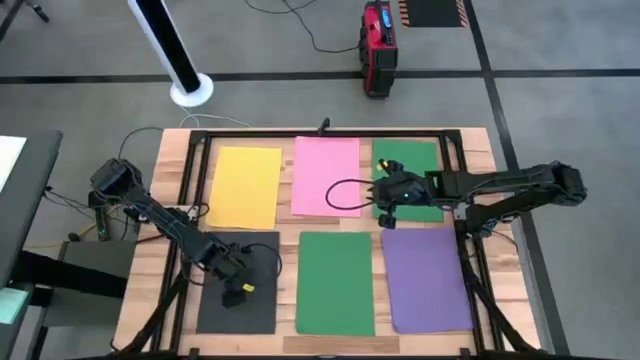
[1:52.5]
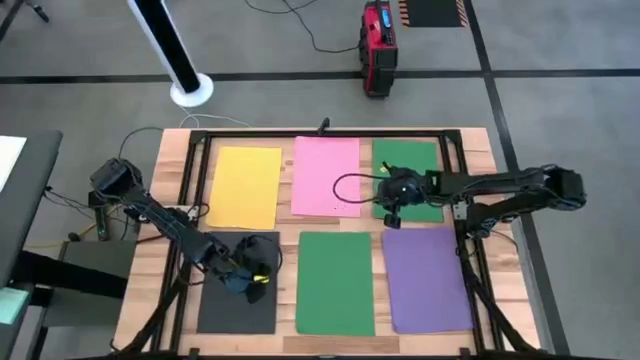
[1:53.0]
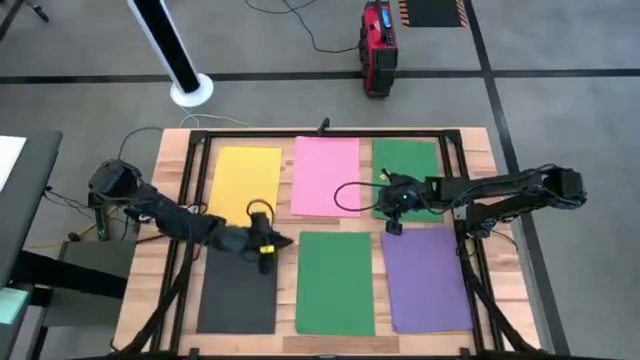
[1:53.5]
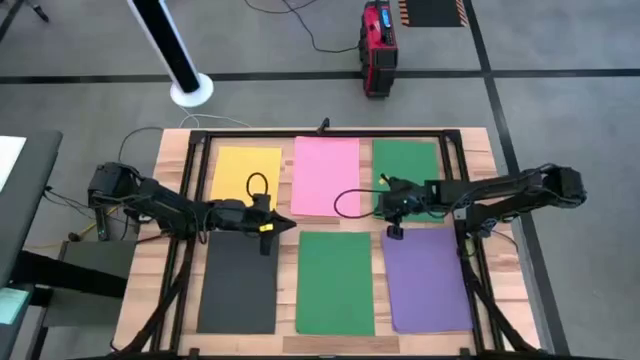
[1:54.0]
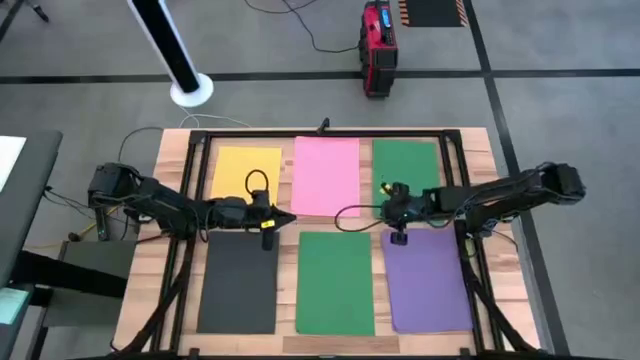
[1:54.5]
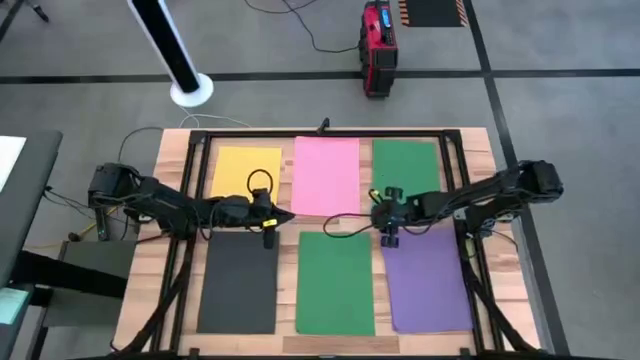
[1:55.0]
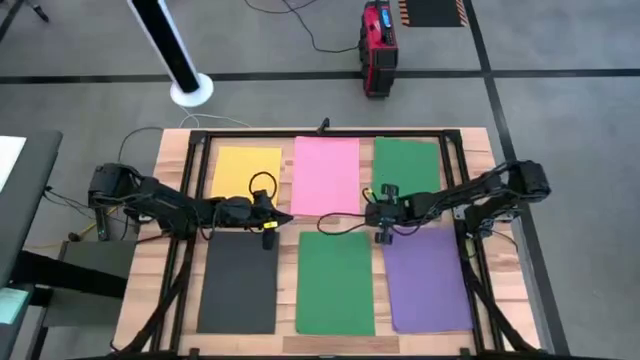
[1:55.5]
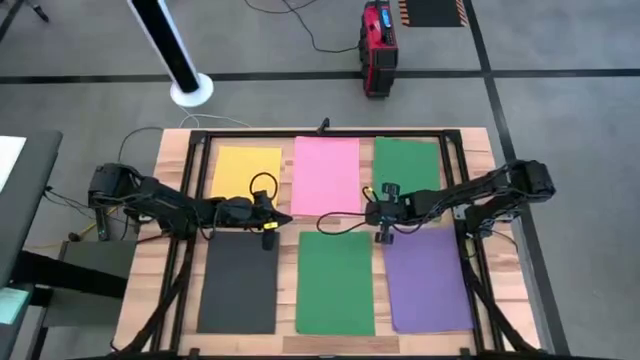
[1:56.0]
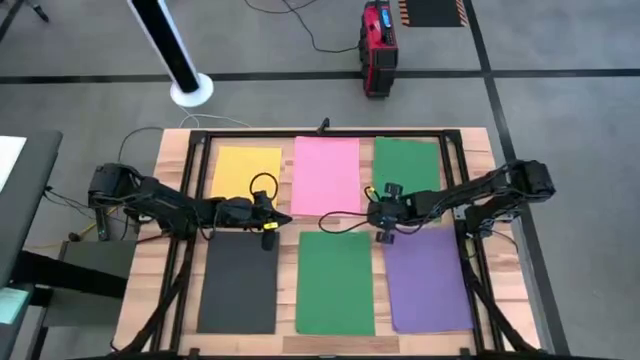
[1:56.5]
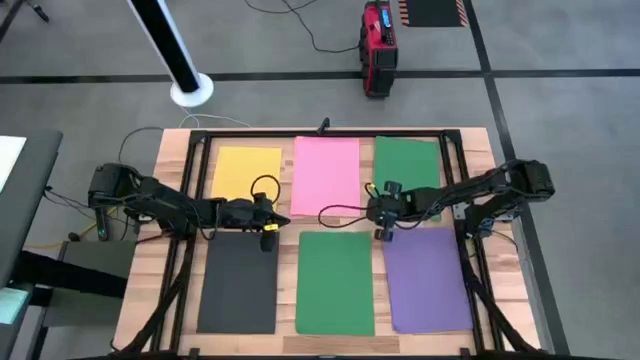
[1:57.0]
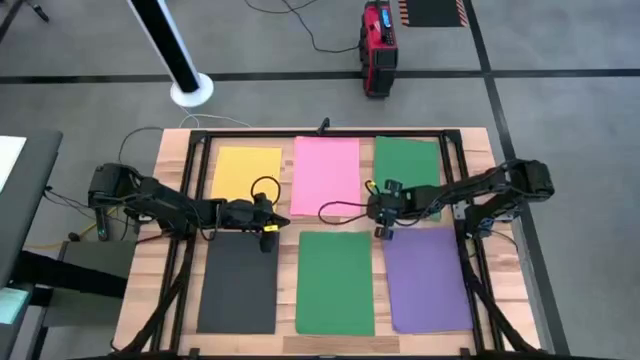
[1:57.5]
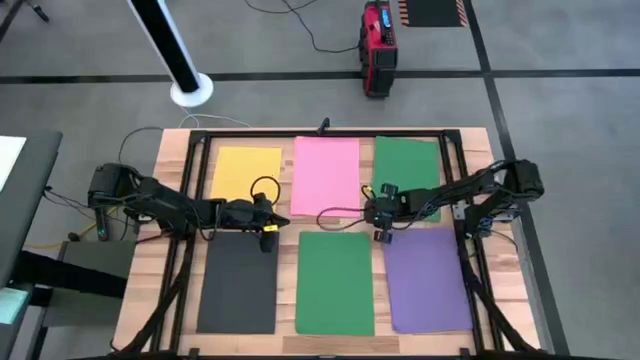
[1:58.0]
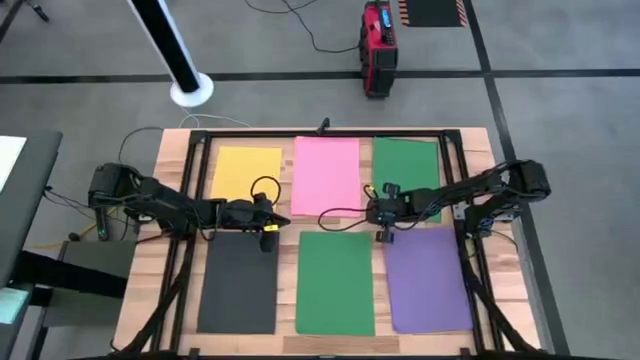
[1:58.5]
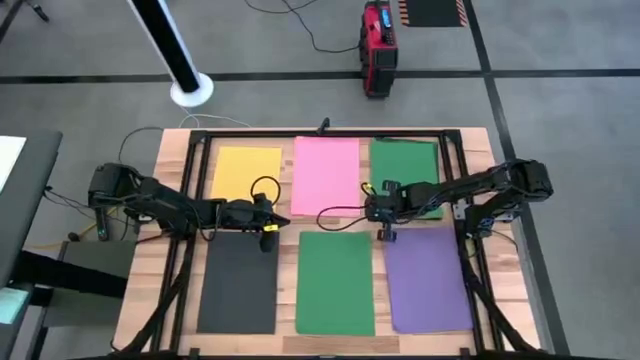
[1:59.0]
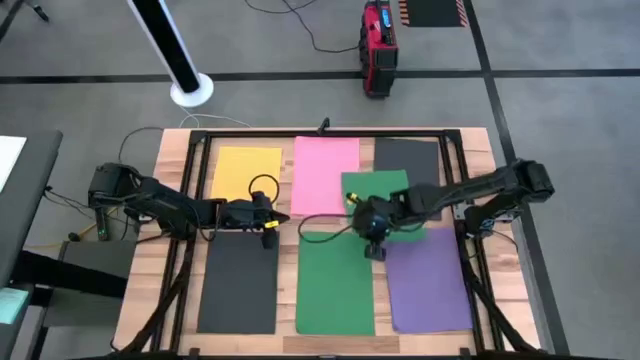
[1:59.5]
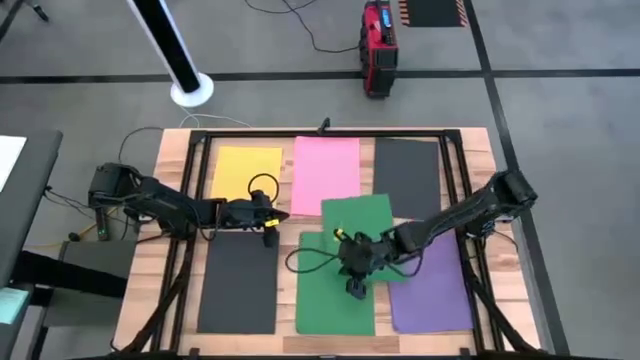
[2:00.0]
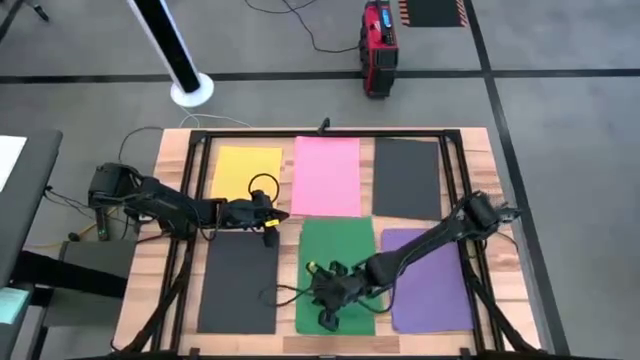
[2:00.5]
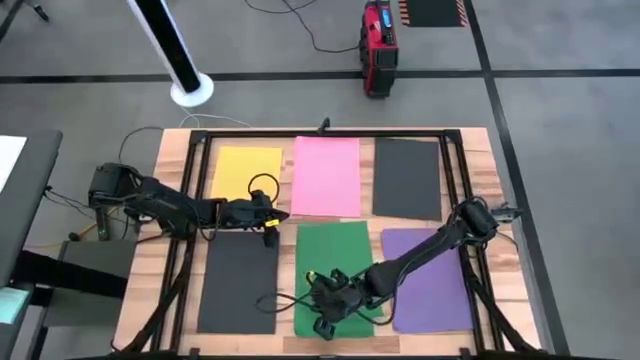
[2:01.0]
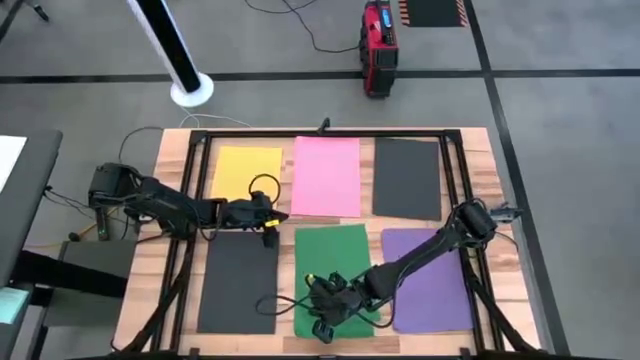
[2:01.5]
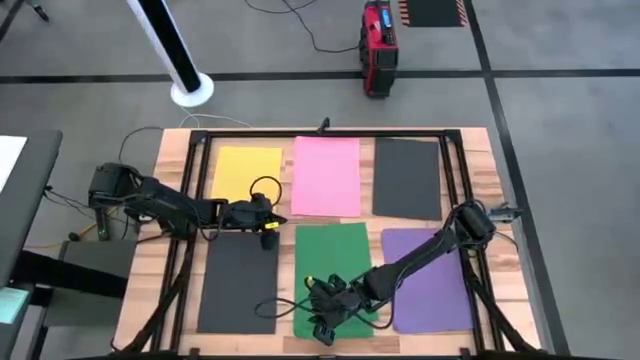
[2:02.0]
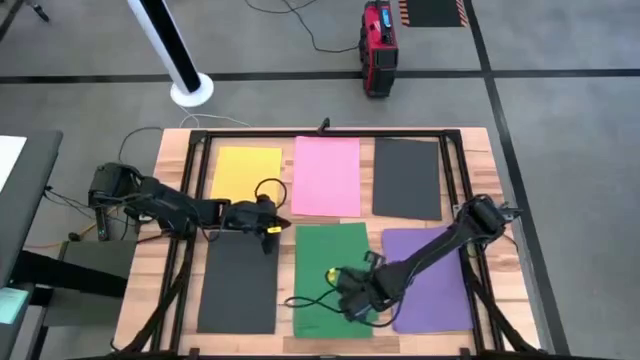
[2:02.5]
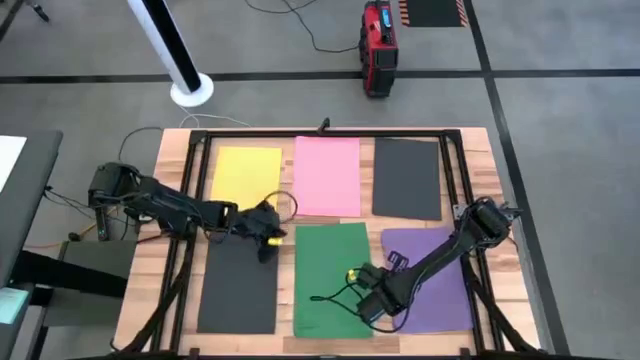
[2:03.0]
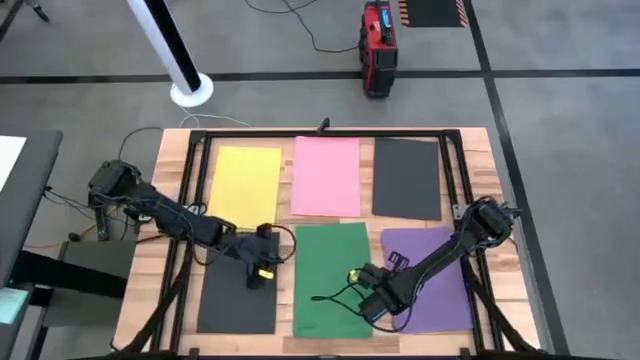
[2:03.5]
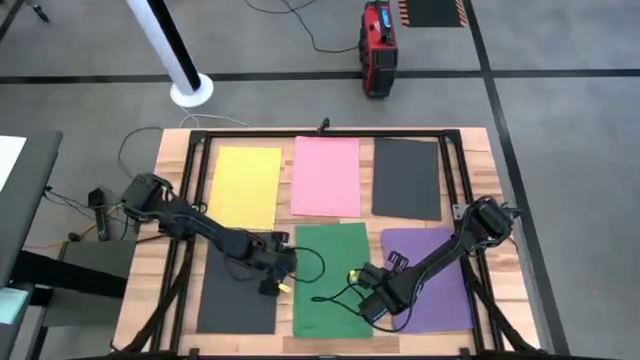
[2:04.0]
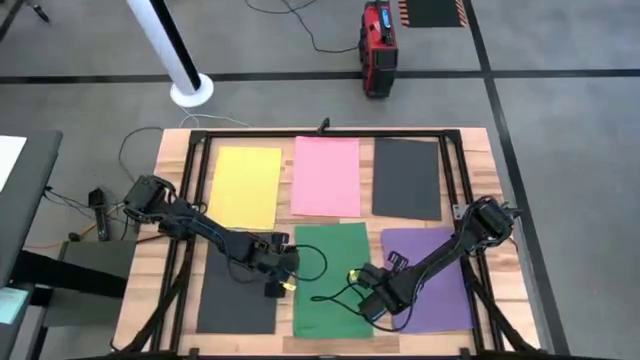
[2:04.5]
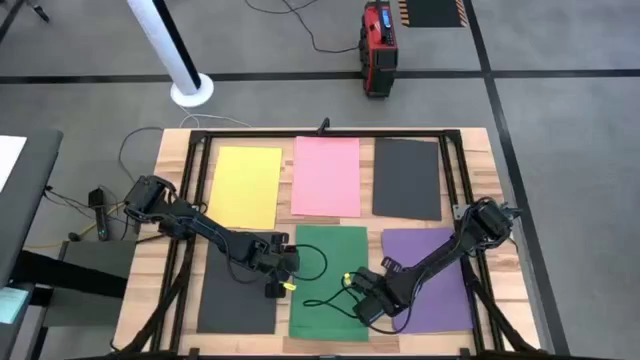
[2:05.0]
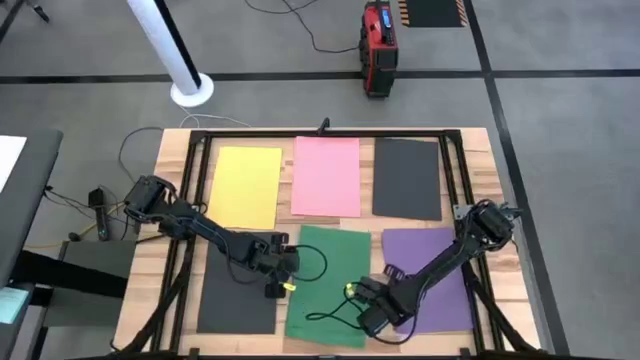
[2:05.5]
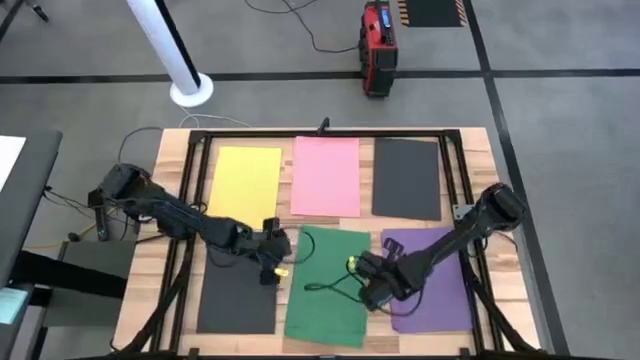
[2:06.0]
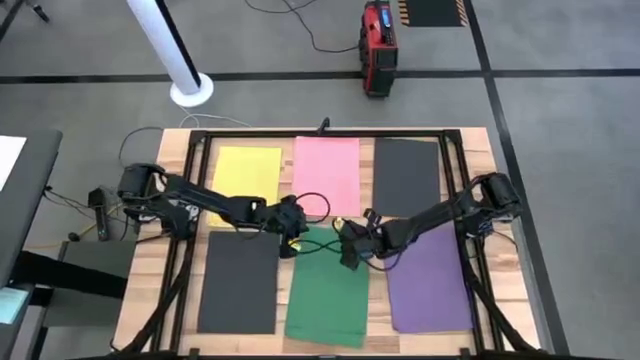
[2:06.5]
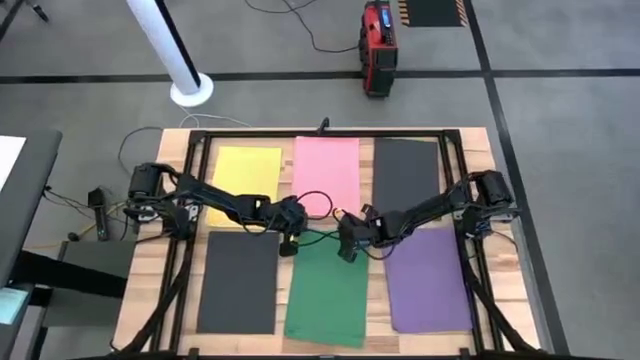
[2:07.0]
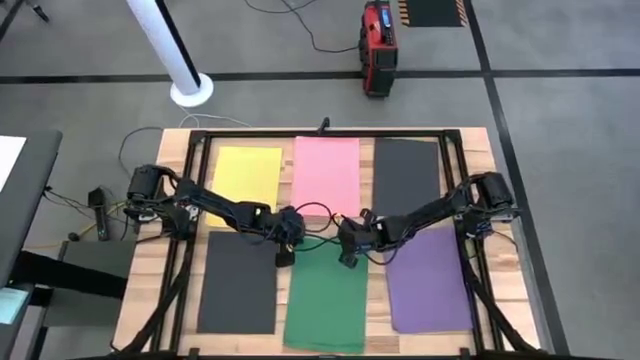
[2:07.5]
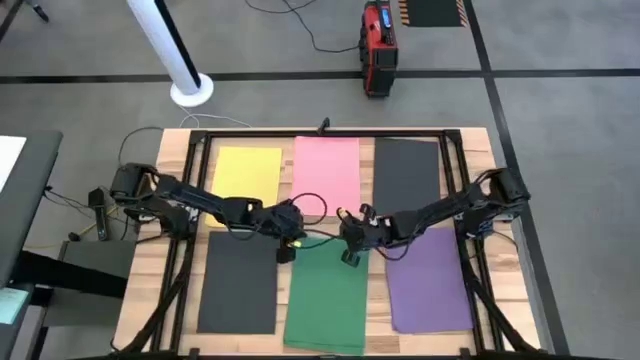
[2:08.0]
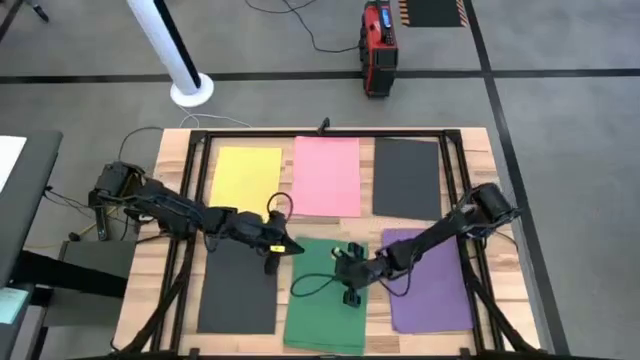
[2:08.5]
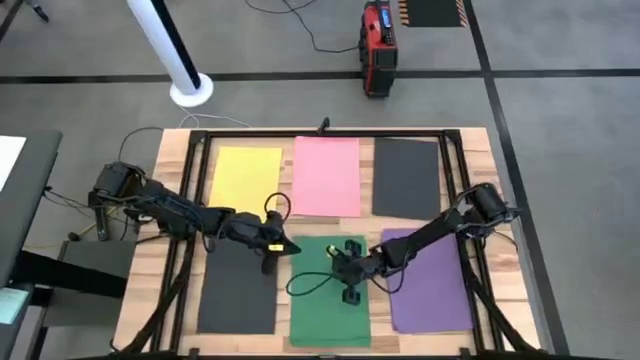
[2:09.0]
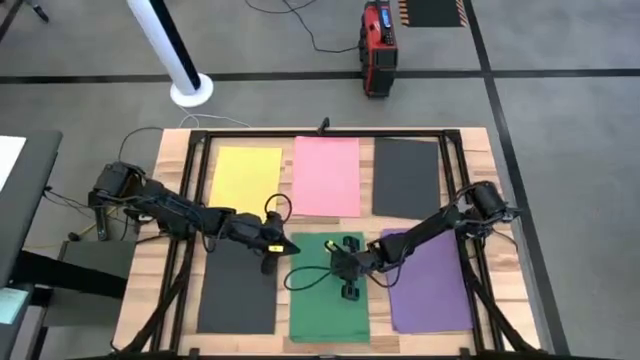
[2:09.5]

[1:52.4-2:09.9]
Task: Organize paper
Stack the top green colored paper on top of the bottom green colored paper

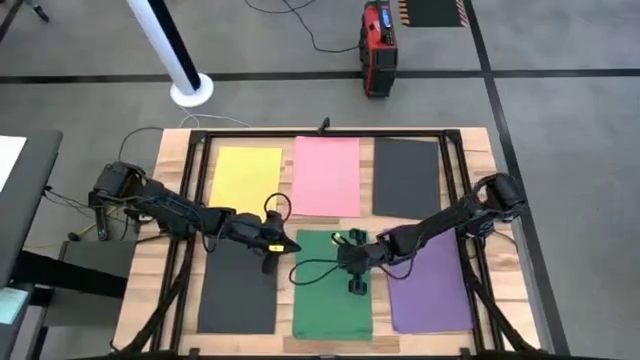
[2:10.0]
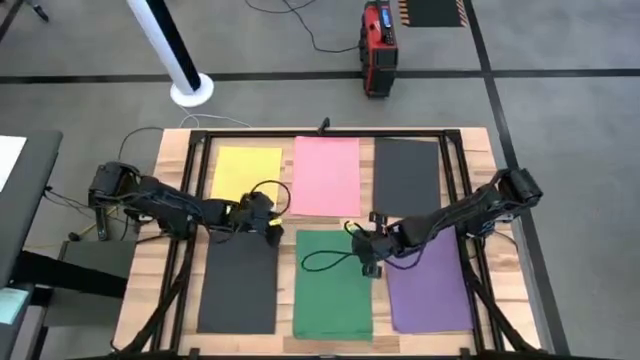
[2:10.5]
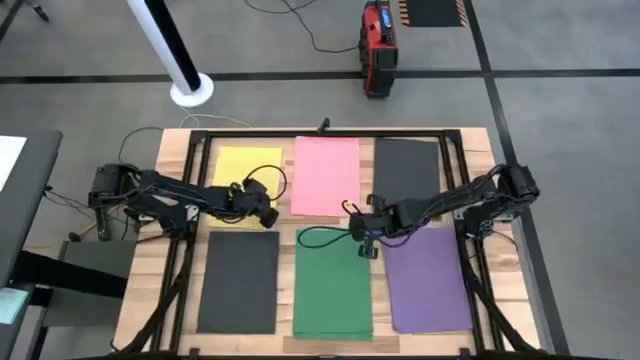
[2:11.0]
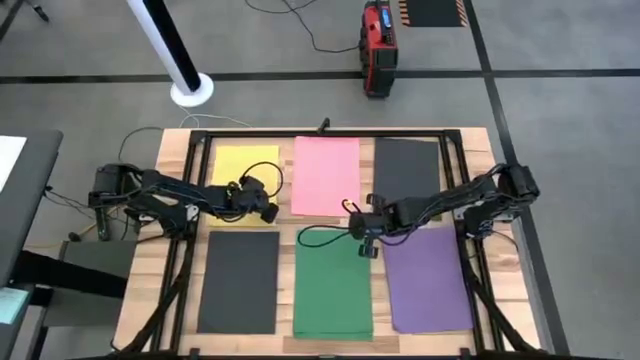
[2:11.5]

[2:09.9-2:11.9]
Adjust the yellow colored paper

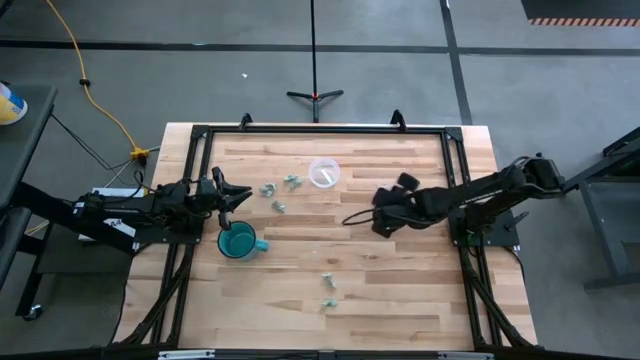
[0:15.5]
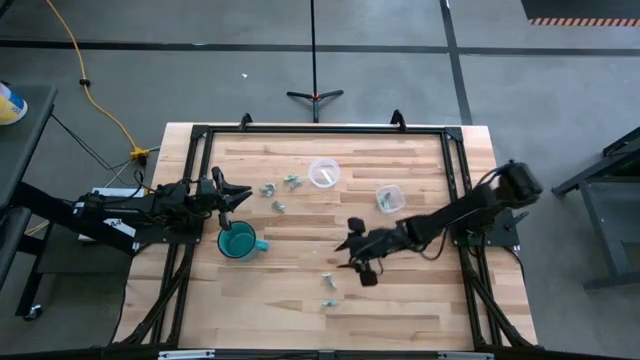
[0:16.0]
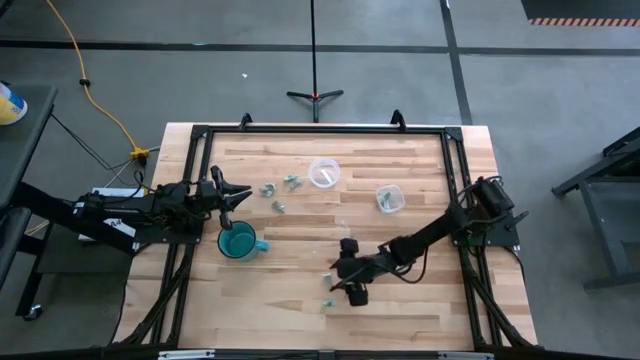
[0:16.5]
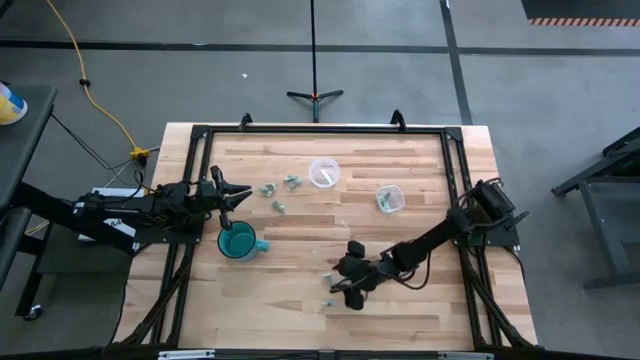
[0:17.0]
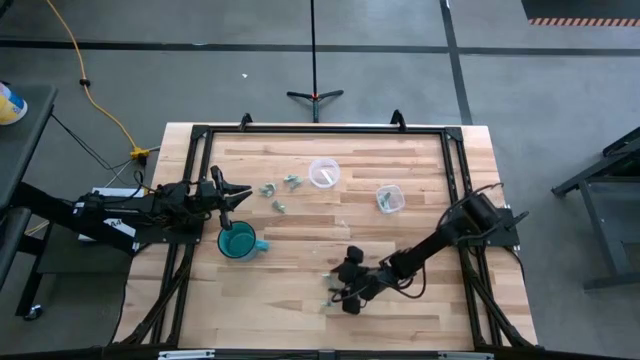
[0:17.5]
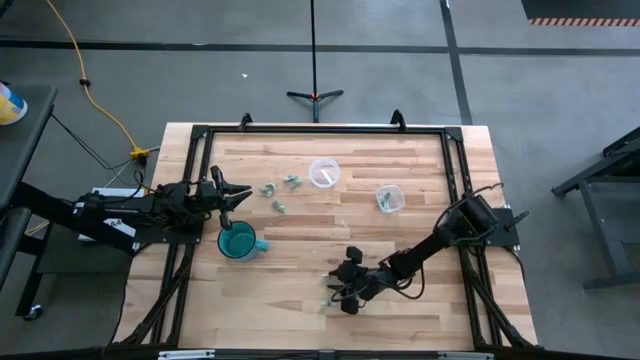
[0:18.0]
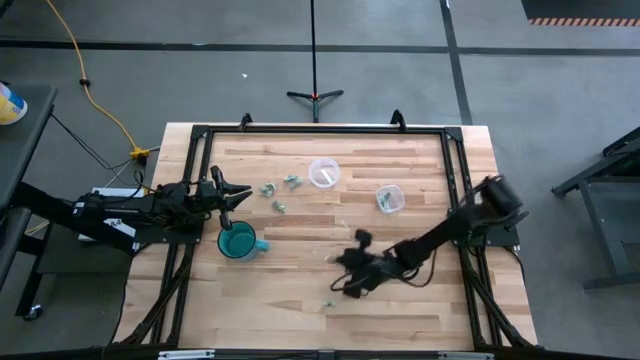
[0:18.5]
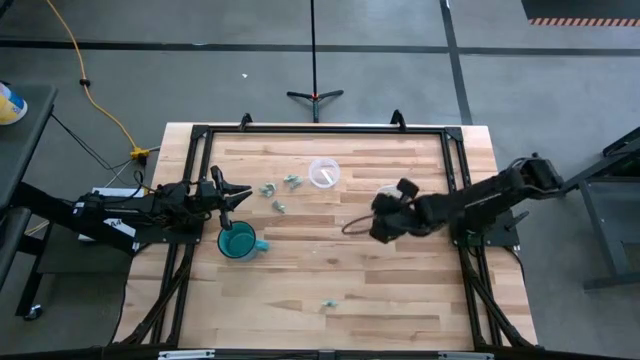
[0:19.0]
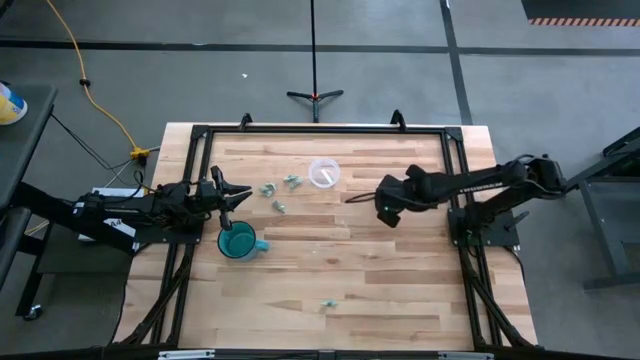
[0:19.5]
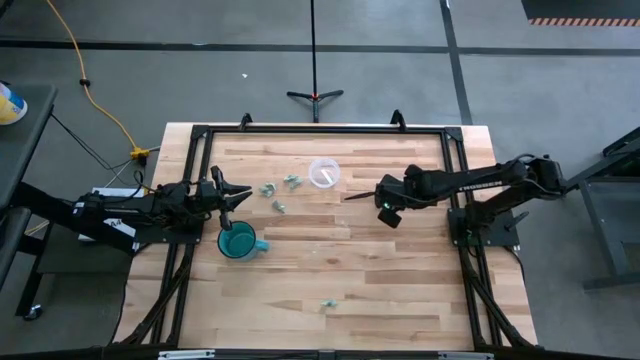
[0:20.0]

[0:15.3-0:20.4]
Task: Pick and place items into bin
Put the stevia packet into the bottom transparent bin
